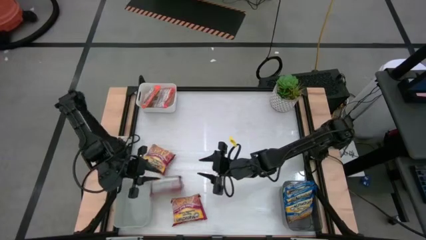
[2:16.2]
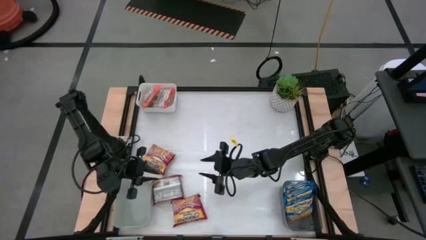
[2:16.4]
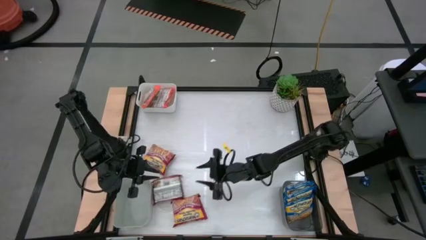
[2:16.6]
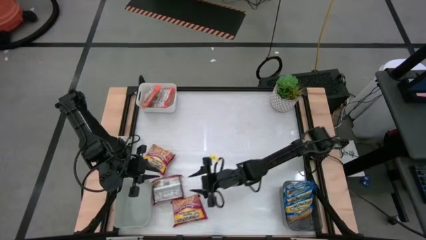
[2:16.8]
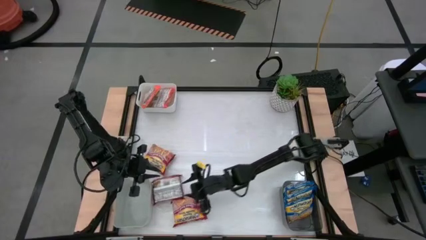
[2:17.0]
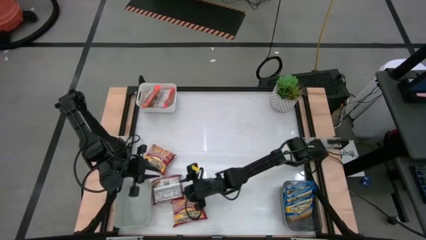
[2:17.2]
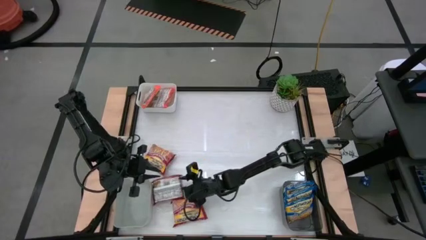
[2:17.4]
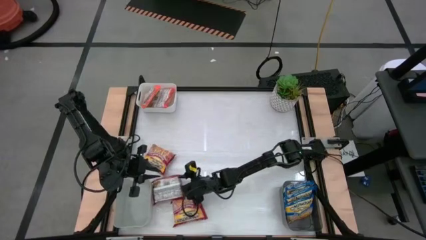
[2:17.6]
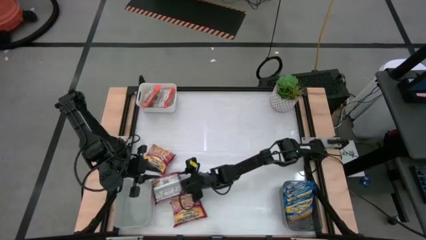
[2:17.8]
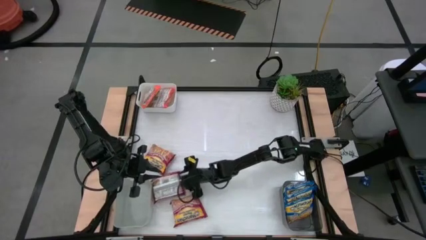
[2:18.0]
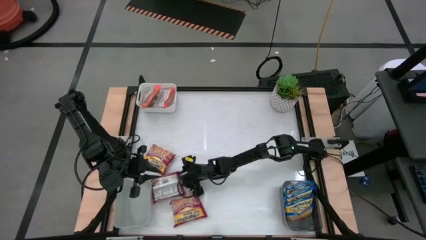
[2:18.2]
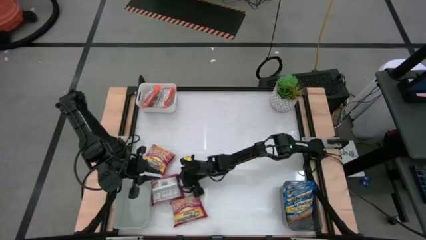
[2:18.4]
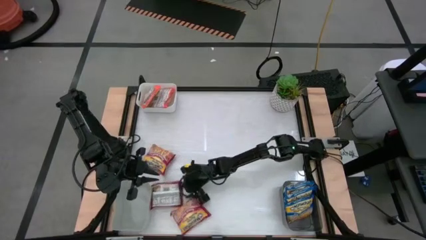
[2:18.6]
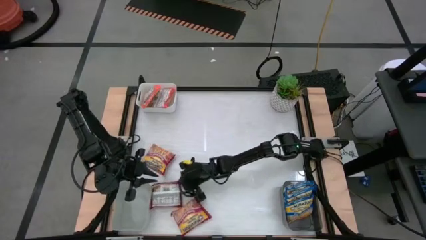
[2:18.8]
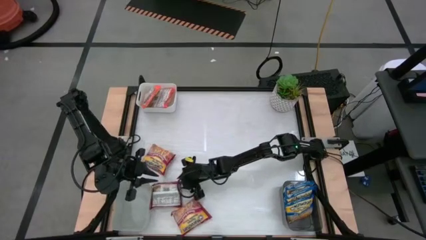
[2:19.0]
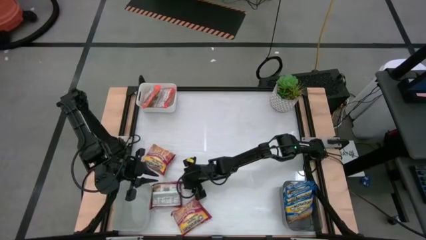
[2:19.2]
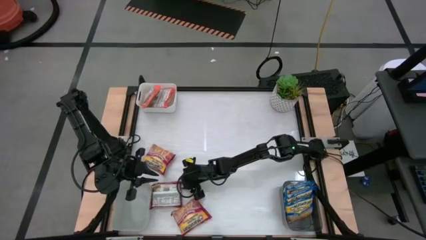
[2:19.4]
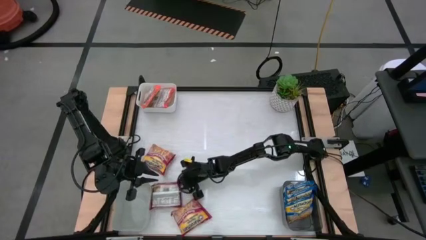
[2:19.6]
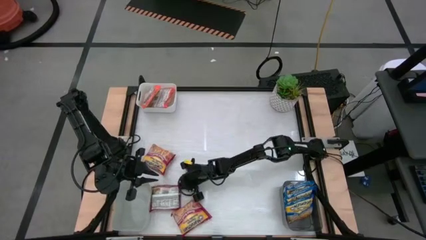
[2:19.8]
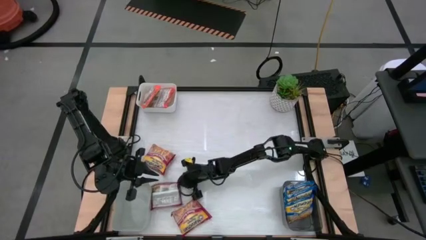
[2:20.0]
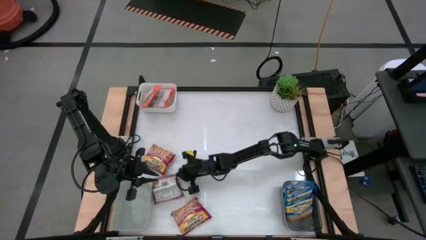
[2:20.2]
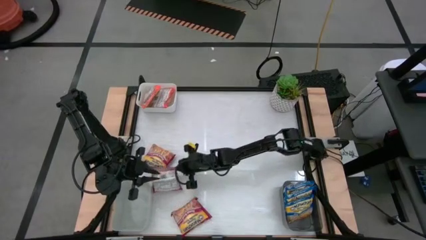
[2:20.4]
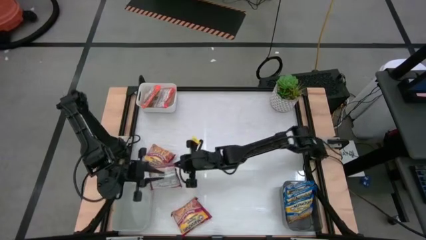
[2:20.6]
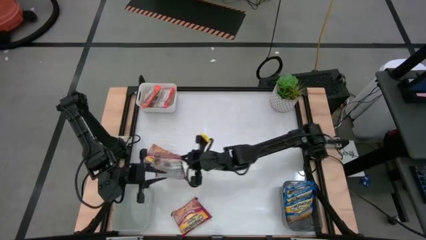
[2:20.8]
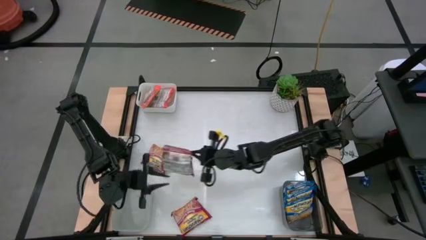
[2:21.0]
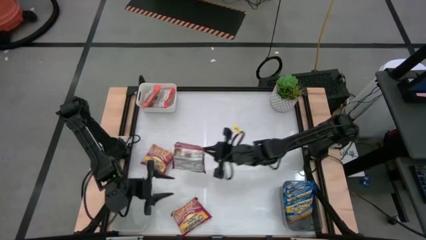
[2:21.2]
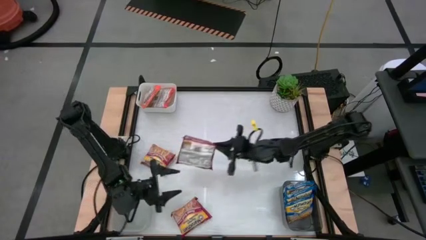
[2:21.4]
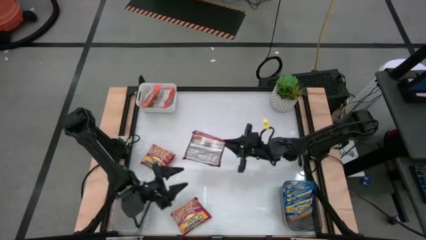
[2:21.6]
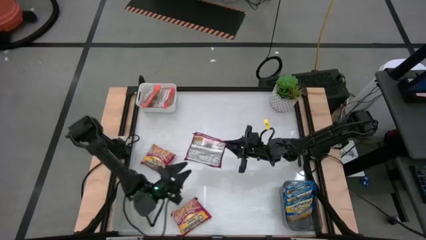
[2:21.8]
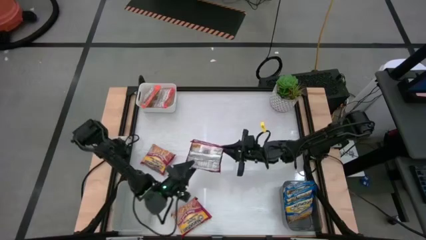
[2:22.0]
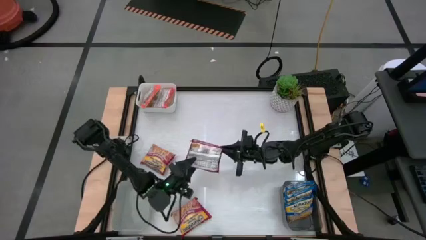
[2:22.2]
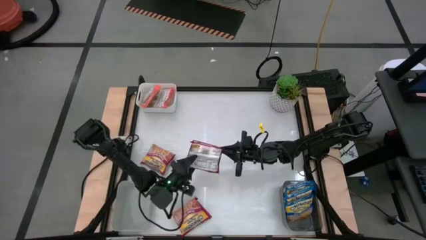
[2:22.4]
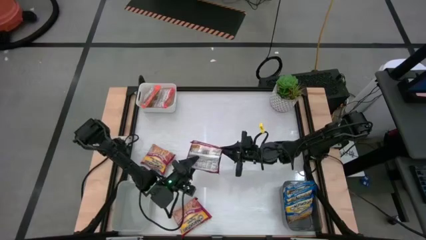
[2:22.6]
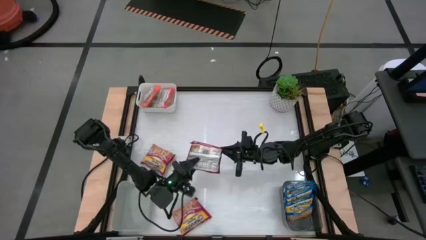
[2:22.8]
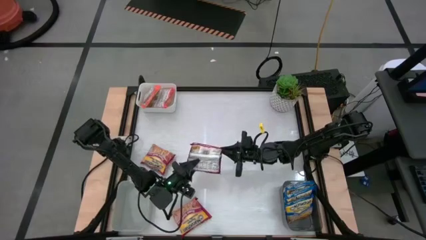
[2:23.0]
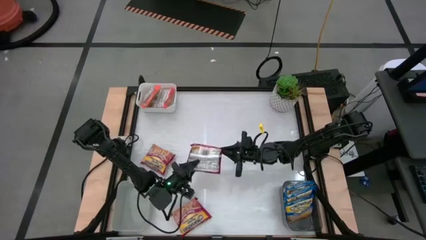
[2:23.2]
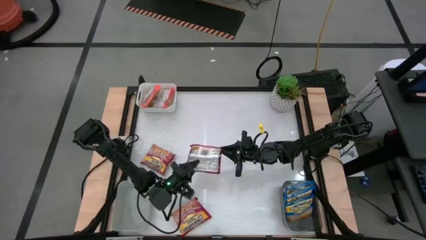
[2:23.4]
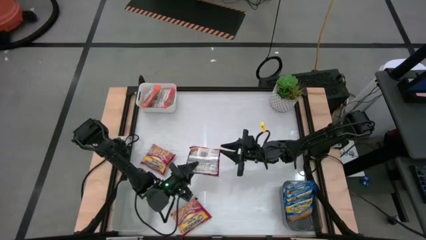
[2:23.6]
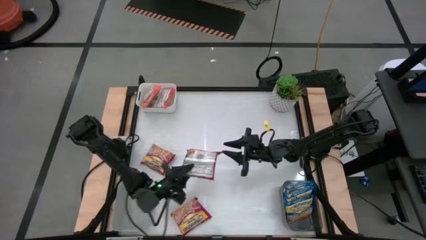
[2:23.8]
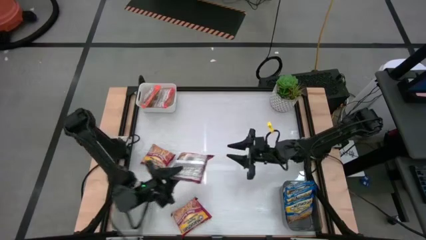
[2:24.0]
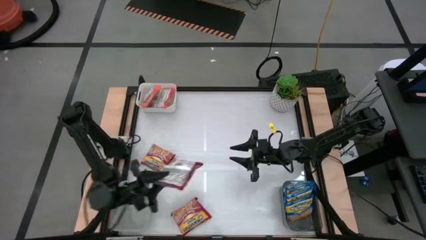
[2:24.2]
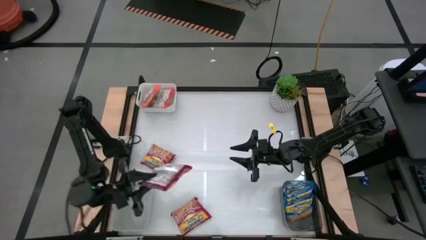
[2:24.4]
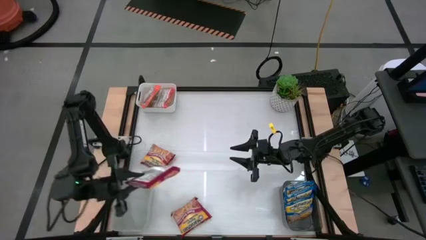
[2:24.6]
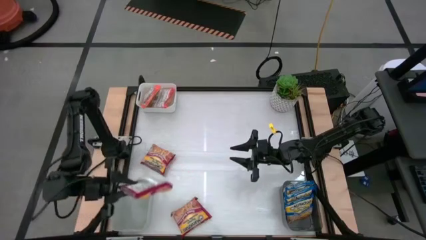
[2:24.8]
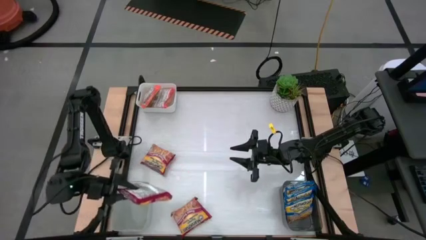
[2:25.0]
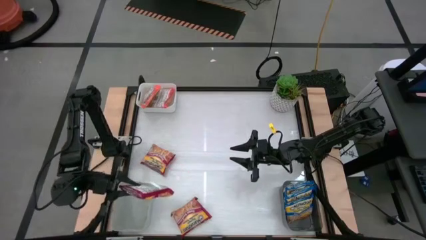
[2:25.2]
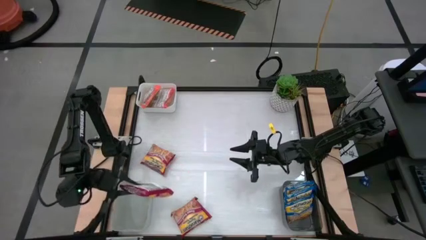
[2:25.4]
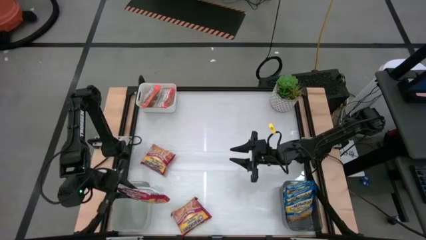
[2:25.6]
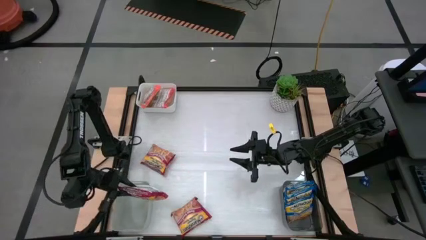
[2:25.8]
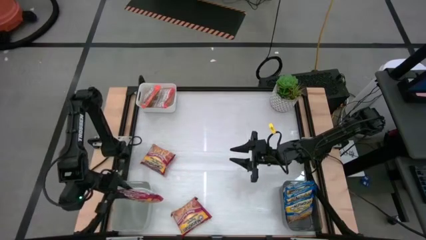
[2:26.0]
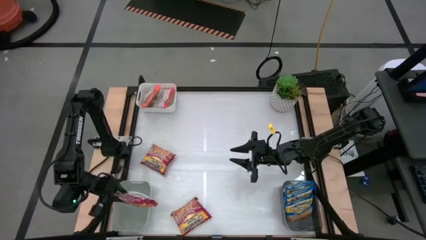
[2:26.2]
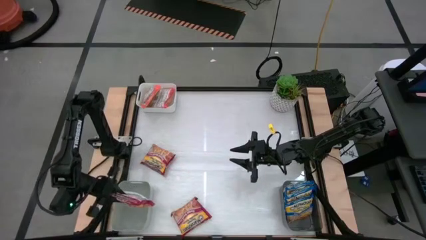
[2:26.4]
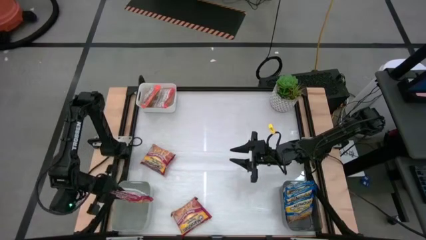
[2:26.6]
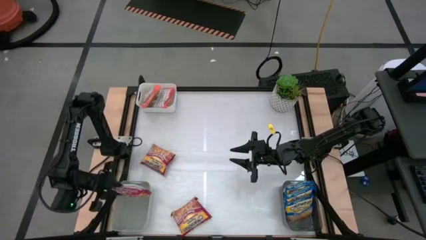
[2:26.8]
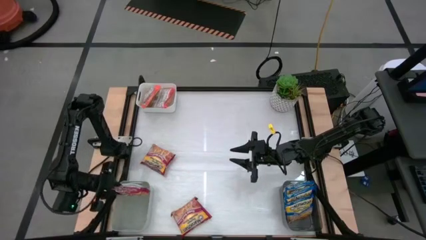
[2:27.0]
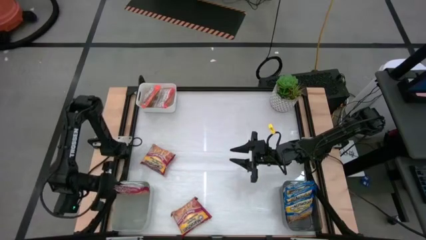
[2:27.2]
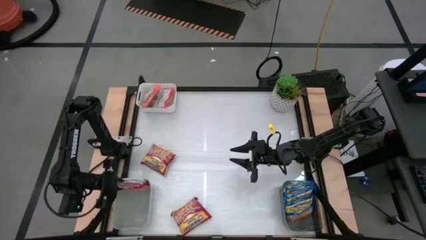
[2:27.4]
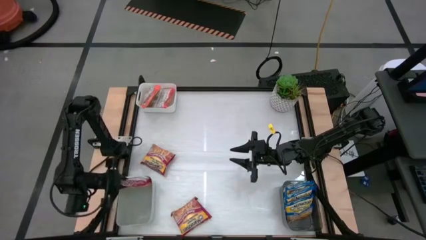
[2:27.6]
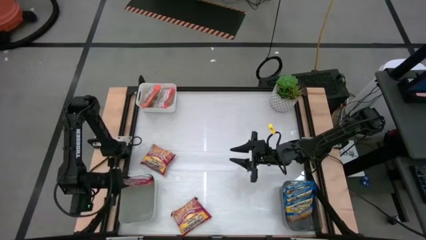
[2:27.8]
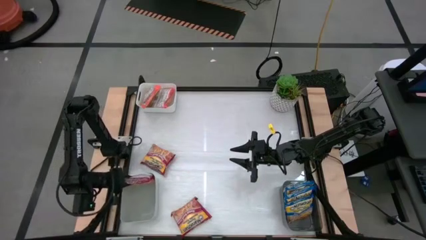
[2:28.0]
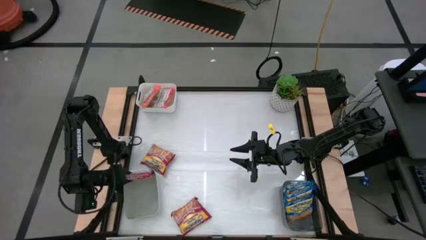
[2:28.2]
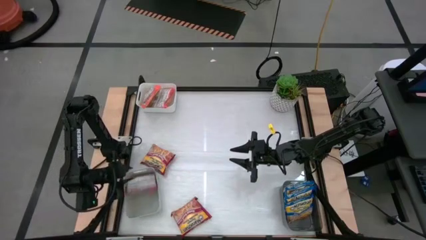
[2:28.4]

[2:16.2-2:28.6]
Task: Sort Maruchan noodles
Put the bottom right red noodle pack into the gray bin

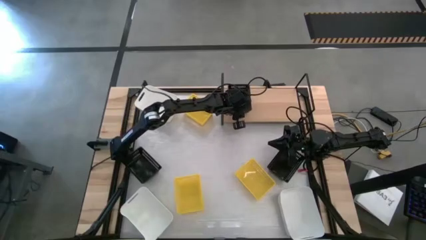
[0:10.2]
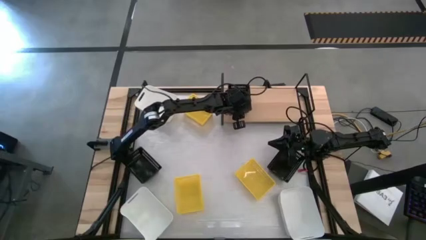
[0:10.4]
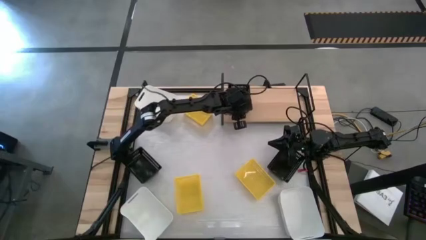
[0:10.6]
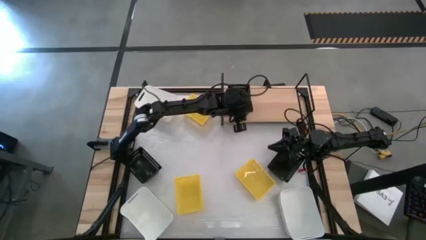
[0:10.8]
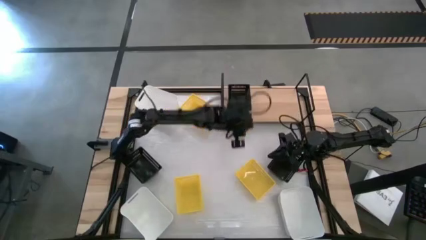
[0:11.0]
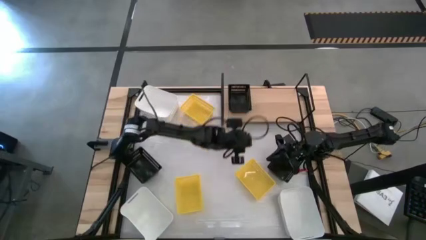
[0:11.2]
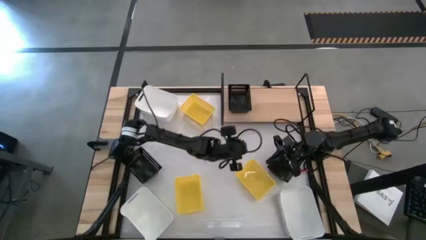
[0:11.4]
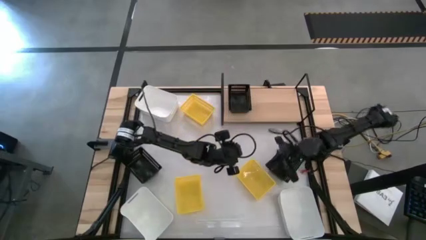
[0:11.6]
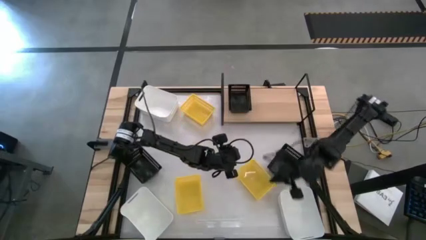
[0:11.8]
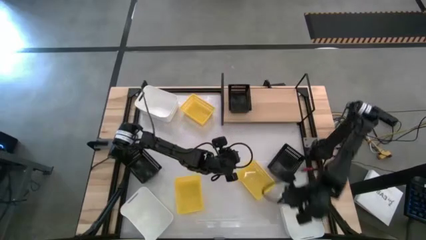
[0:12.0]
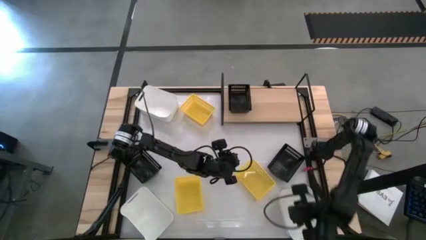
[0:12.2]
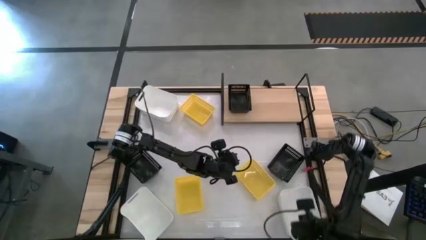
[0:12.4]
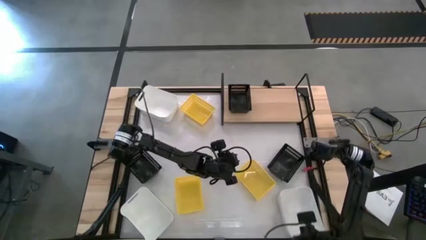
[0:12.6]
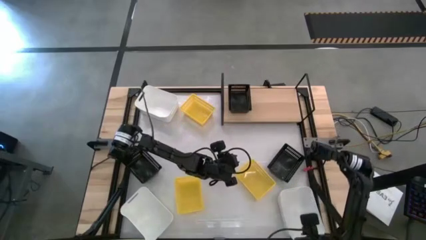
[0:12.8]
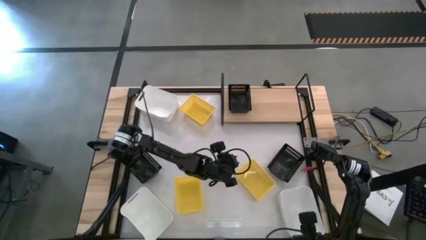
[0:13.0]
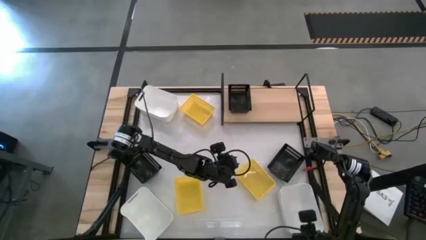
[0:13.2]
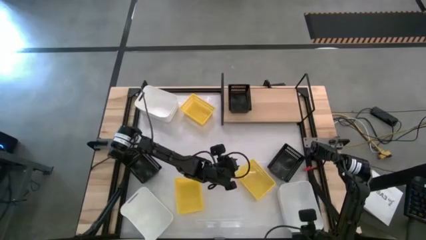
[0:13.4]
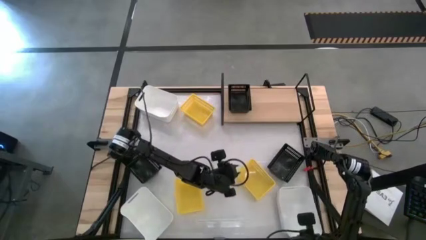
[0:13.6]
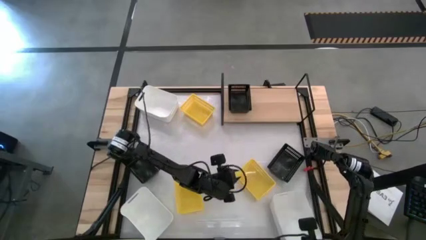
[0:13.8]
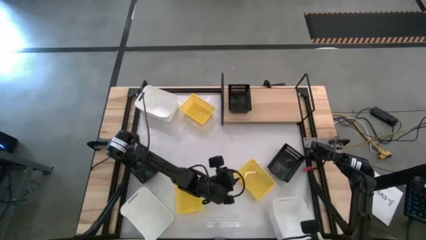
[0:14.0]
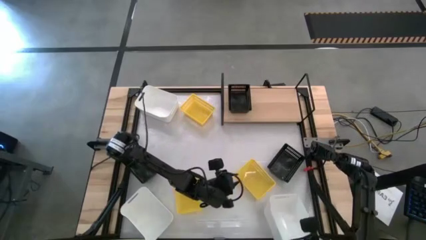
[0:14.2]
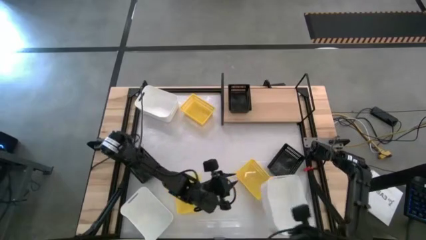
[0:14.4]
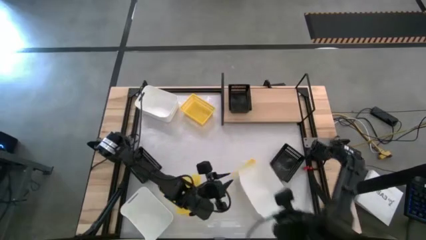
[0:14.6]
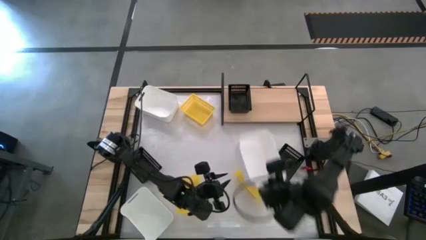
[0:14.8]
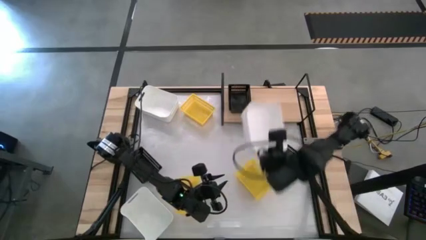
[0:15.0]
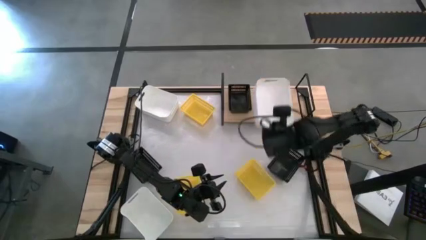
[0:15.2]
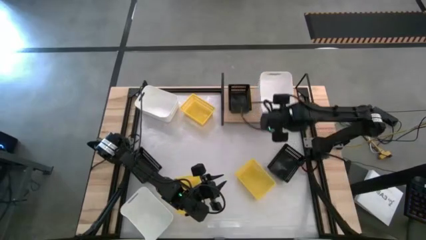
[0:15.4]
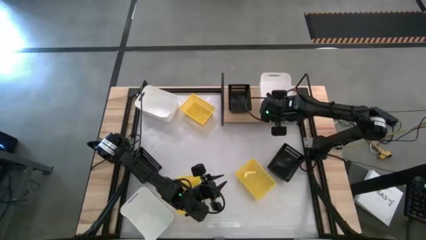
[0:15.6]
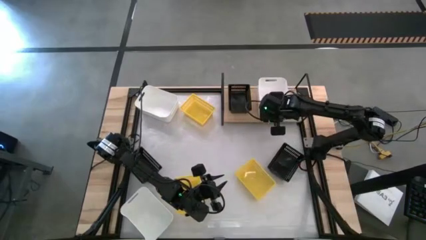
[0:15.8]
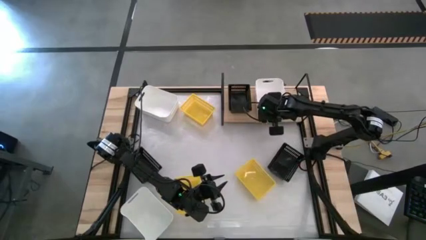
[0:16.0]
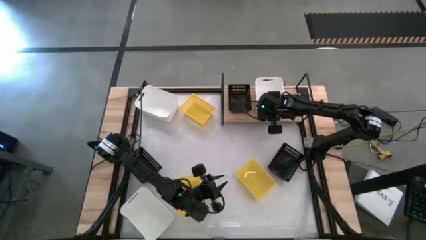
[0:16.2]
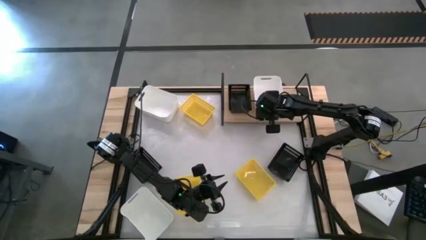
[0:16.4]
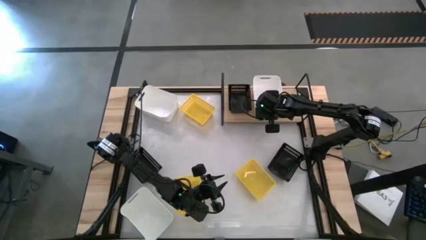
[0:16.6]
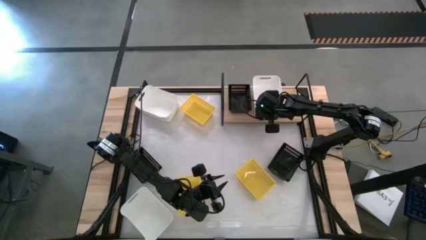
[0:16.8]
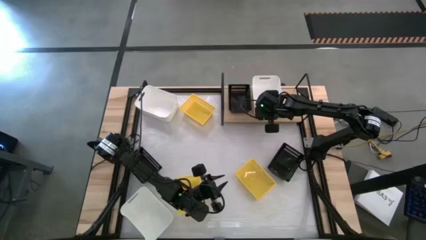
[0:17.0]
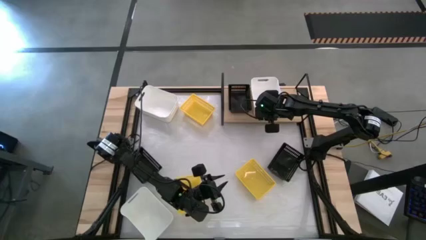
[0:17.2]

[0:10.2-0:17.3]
Task: Stack baskets on shelf by color
Put the bottom right white bin on the shelf
